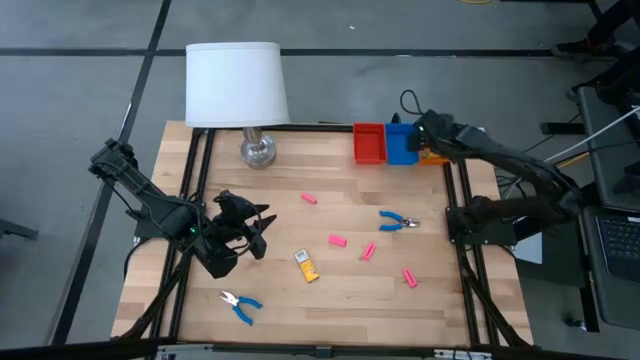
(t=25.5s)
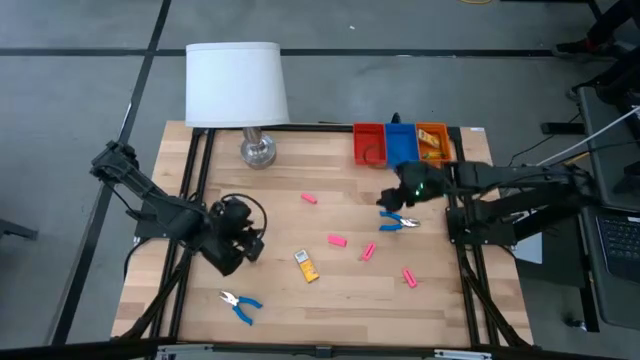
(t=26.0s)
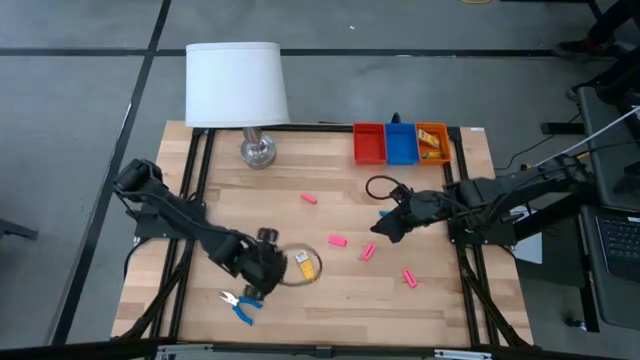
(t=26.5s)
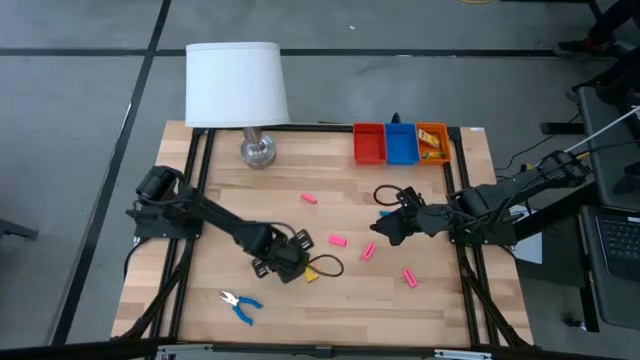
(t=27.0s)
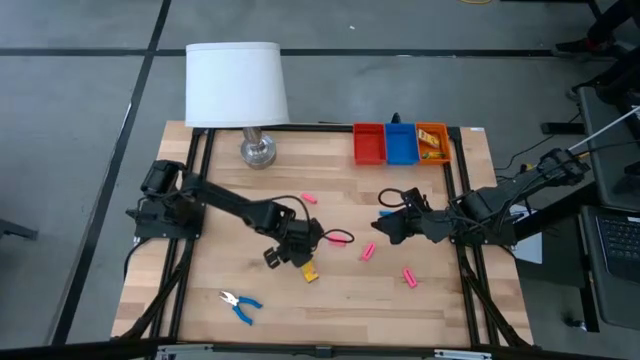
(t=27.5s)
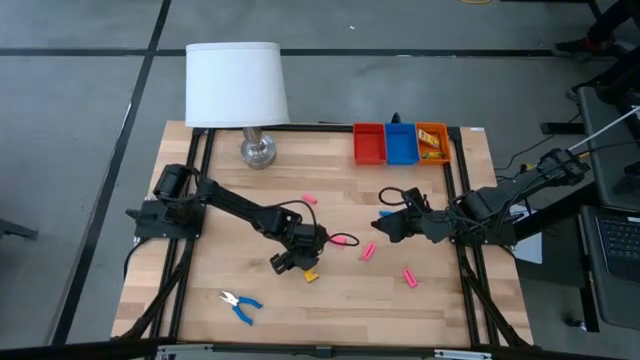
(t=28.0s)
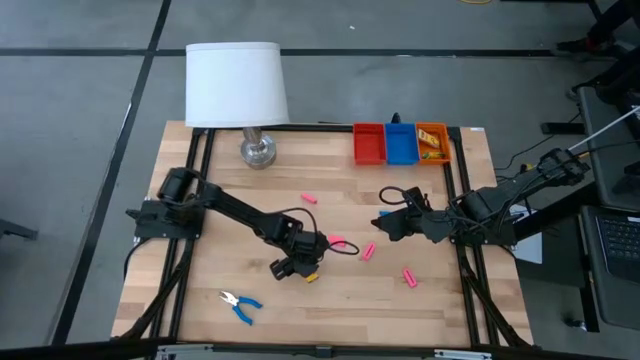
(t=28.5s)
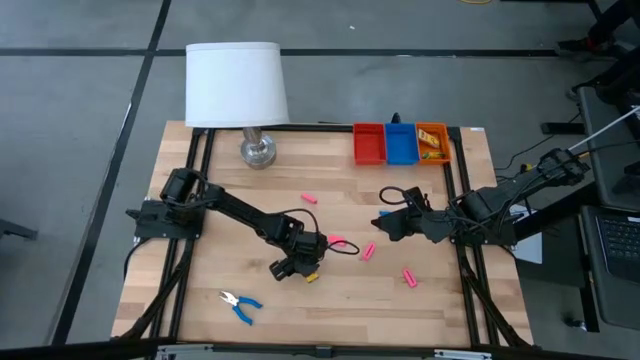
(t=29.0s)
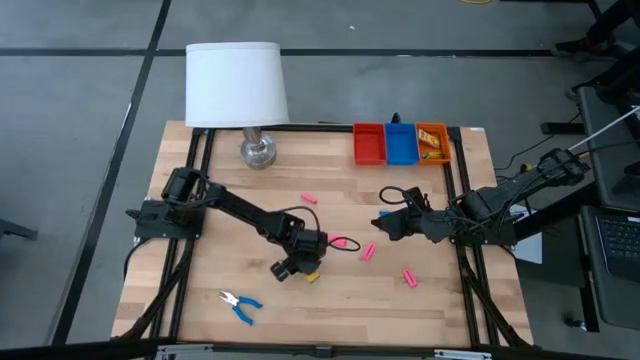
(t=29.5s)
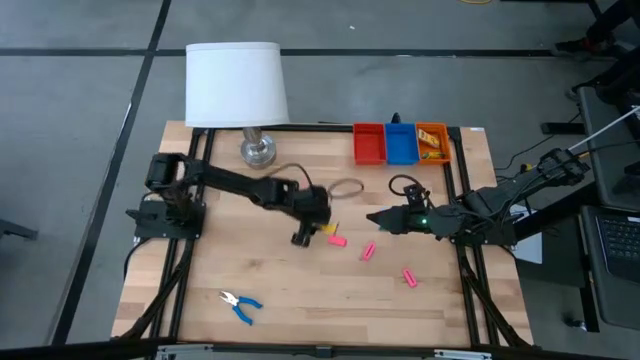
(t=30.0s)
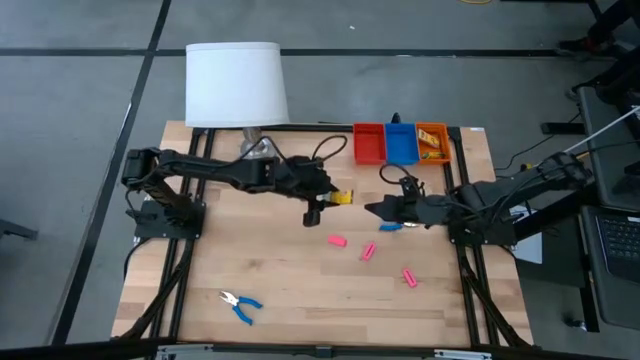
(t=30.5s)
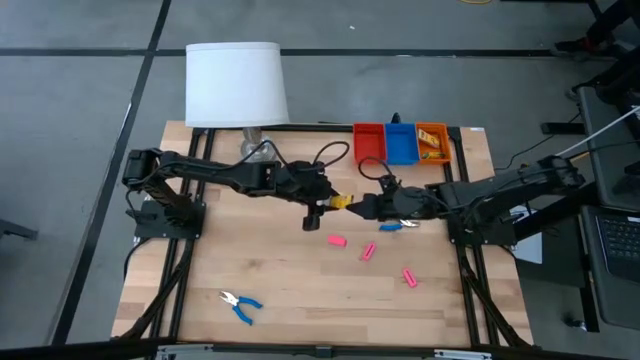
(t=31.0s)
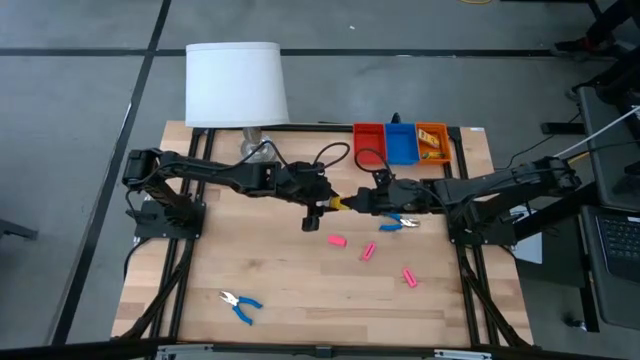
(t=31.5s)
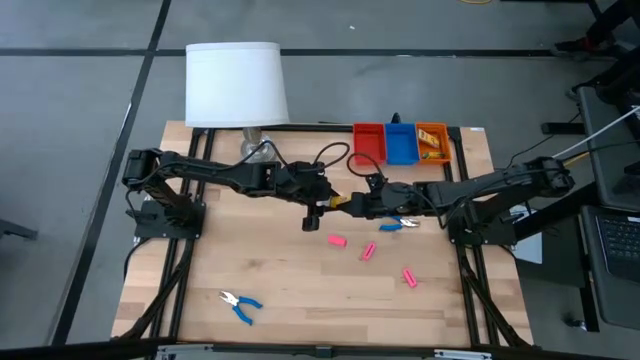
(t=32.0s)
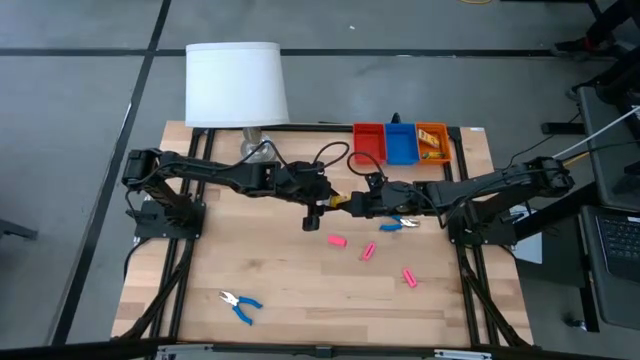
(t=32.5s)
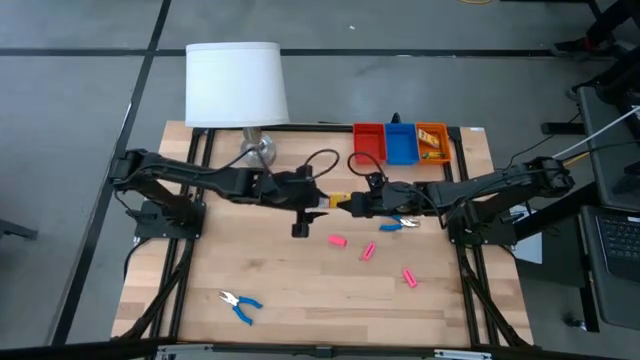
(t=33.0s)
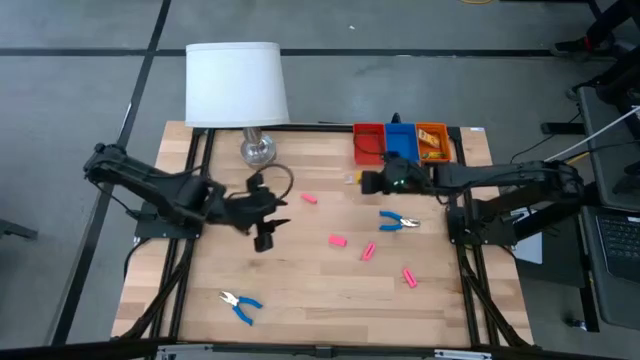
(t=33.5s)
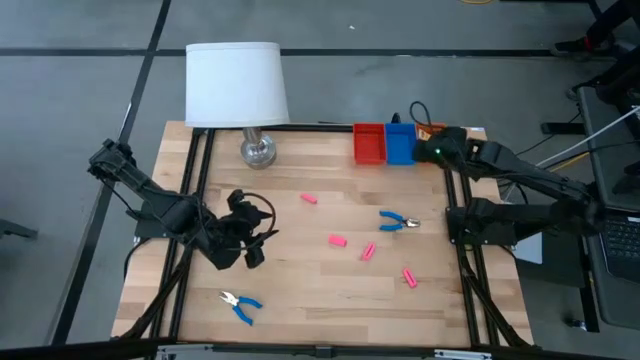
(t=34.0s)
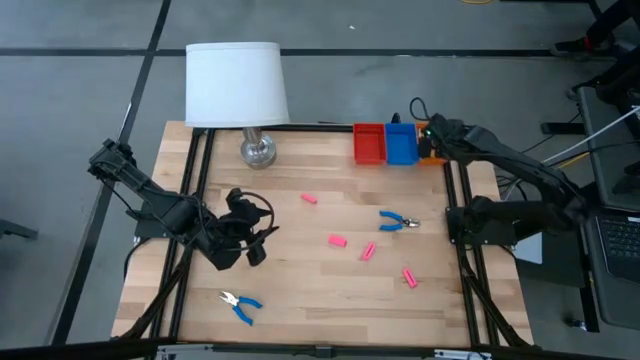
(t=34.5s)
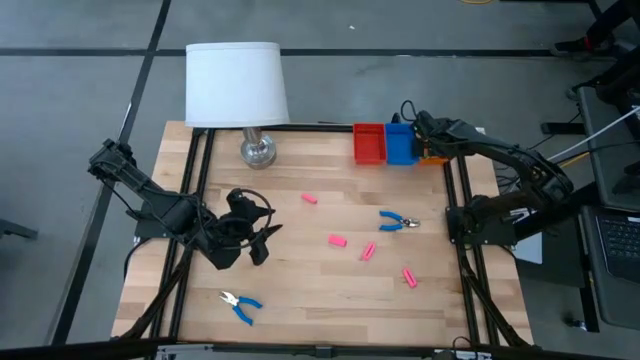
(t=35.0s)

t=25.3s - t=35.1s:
Task: Pick & Place School Supplies
Put the crayon box into the orange bin

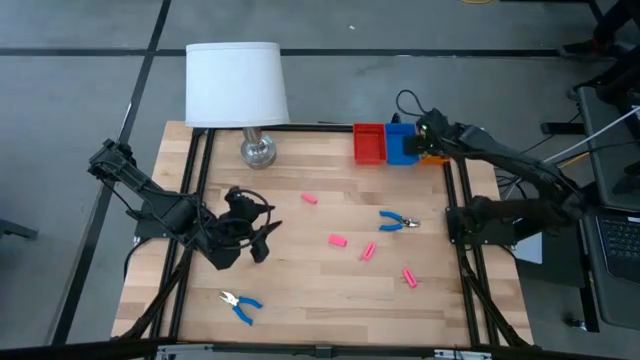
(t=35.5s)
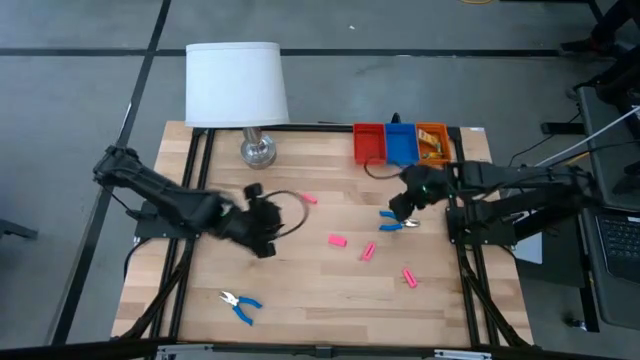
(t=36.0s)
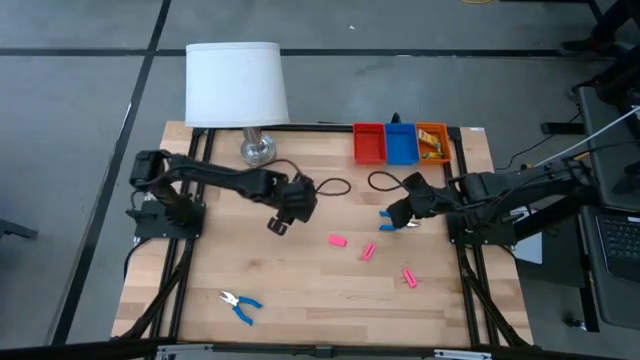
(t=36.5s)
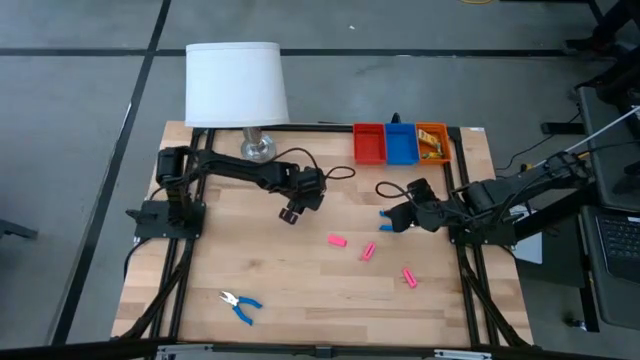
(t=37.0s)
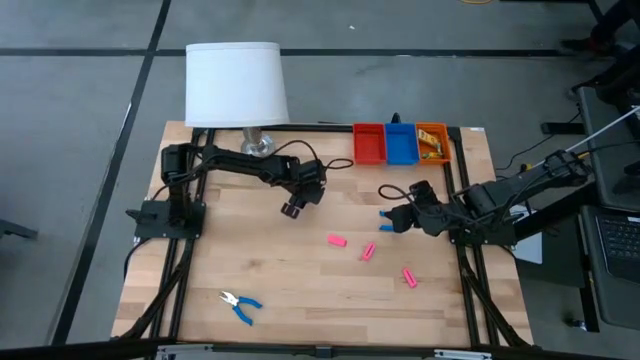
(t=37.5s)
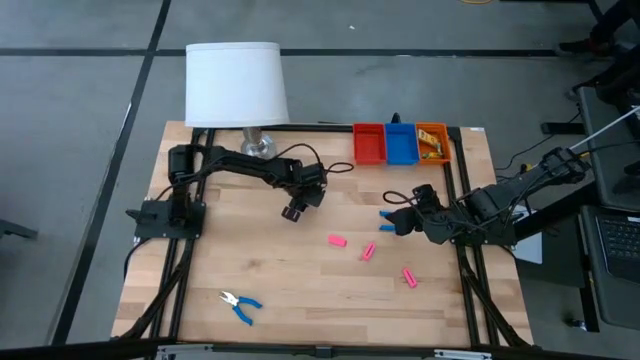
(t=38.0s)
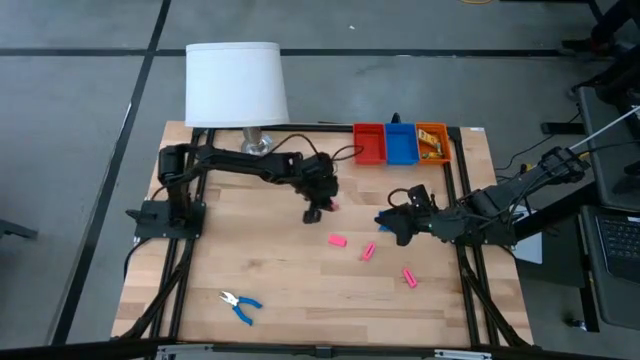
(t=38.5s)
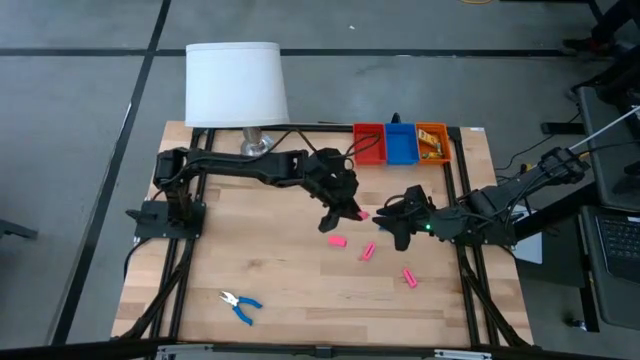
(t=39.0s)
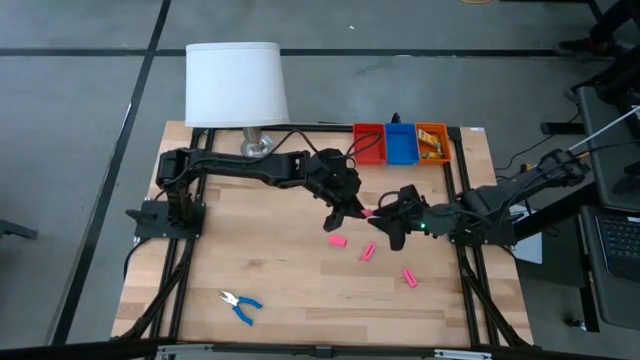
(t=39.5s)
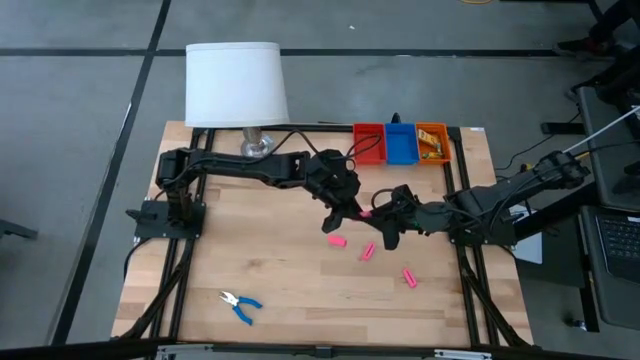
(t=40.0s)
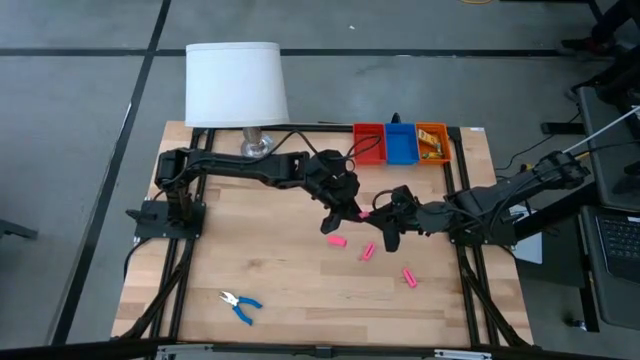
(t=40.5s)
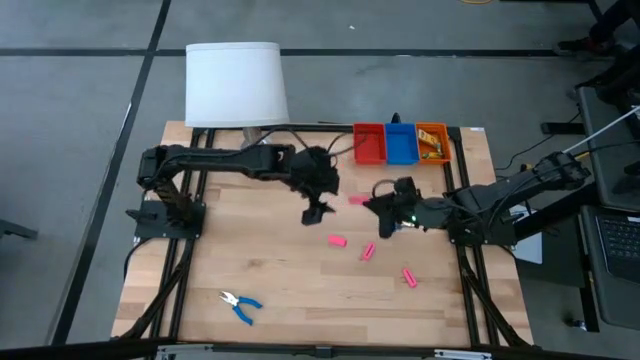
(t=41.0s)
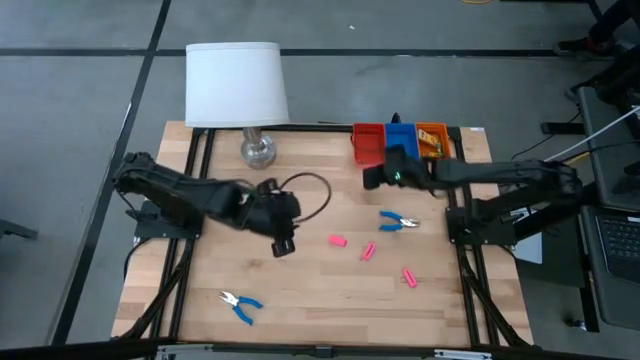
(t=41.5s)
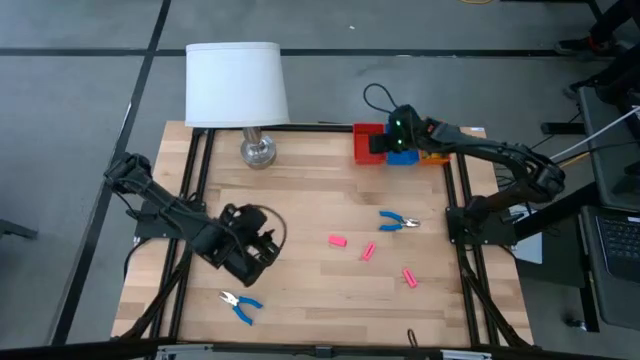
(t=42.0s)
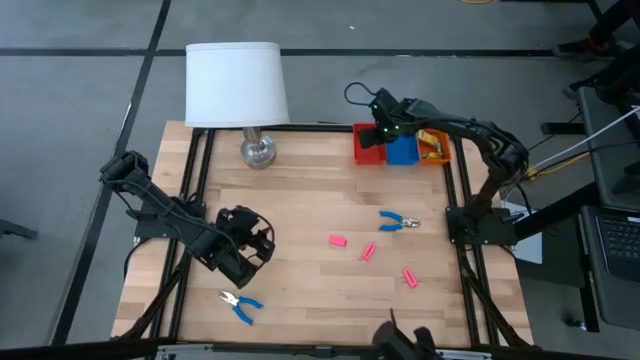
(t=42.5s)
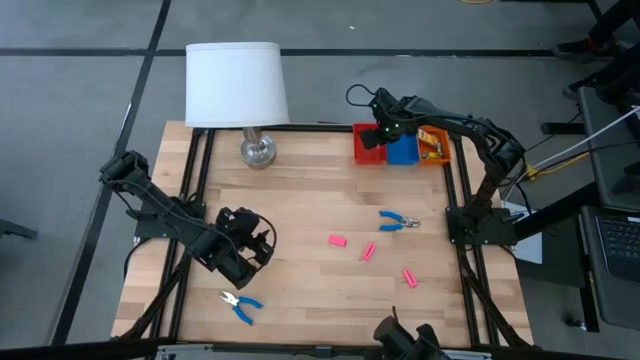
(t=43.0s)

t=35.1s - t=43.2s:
Put the pink eraser into the red bin

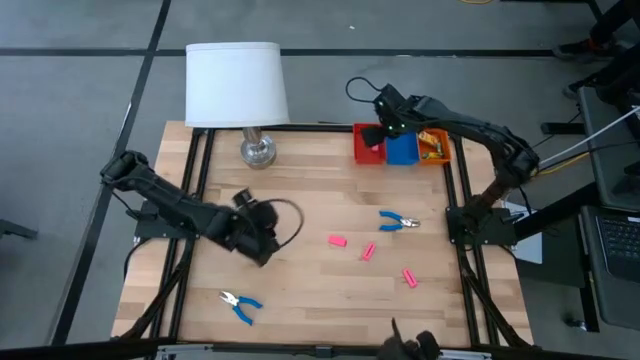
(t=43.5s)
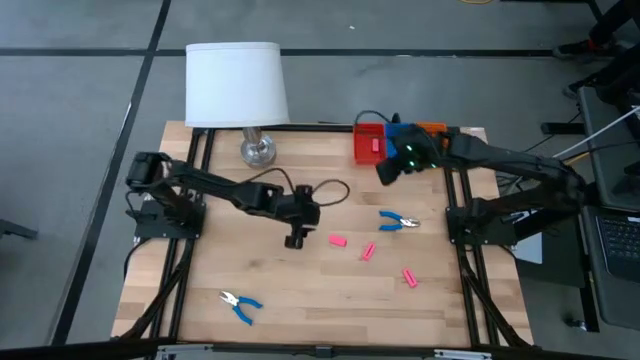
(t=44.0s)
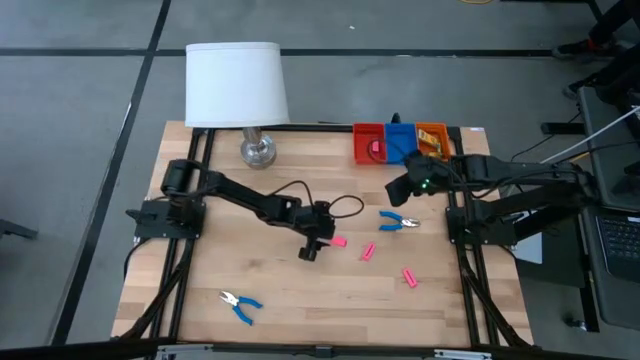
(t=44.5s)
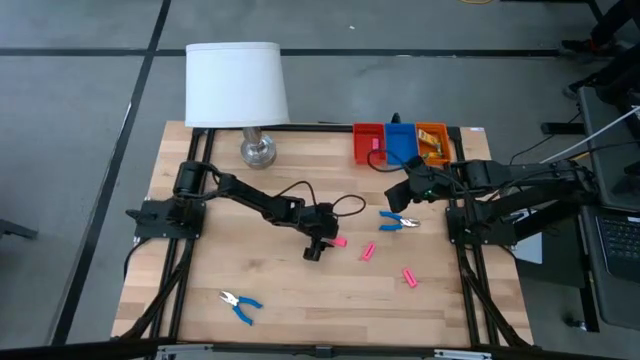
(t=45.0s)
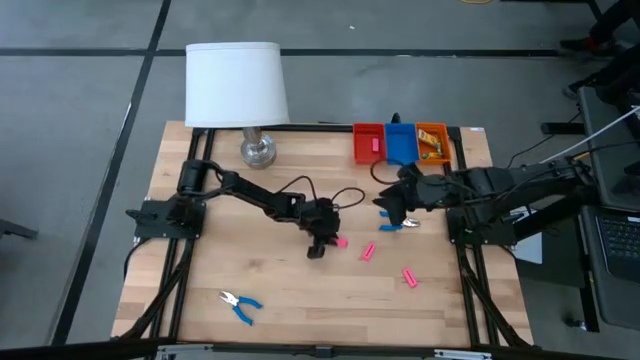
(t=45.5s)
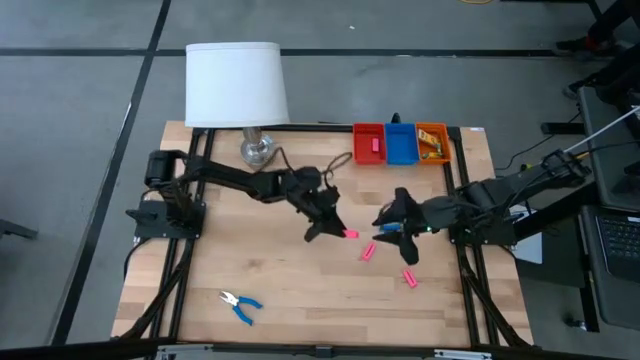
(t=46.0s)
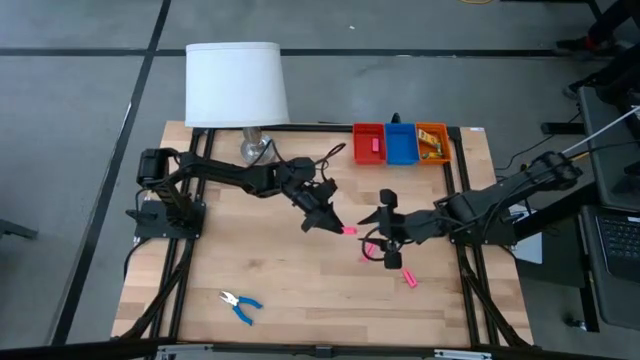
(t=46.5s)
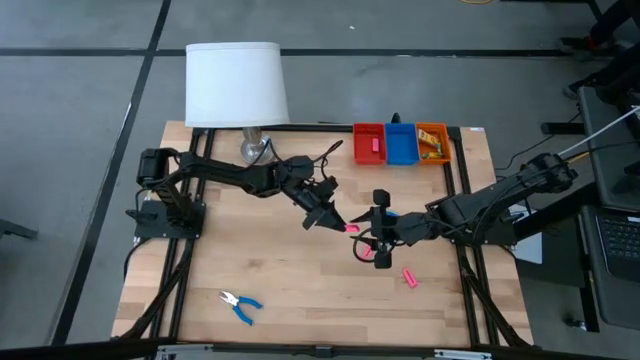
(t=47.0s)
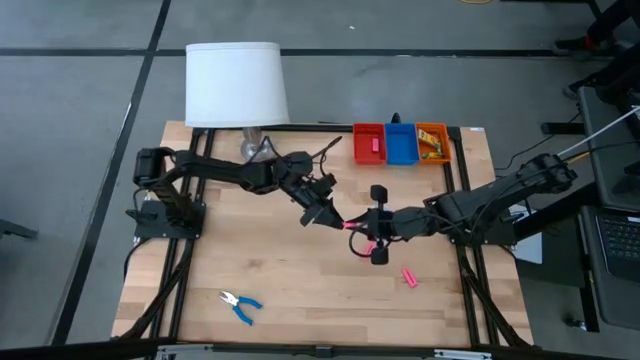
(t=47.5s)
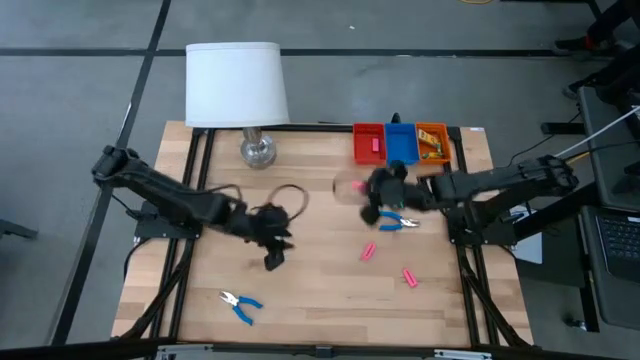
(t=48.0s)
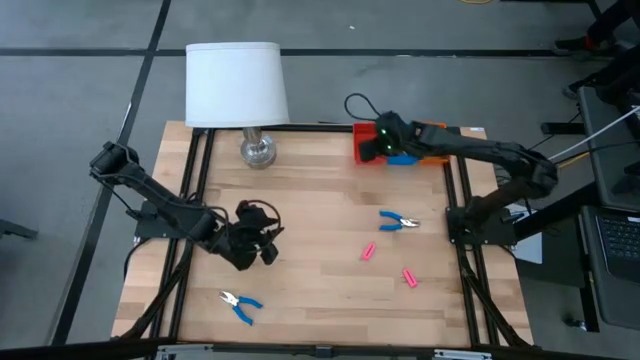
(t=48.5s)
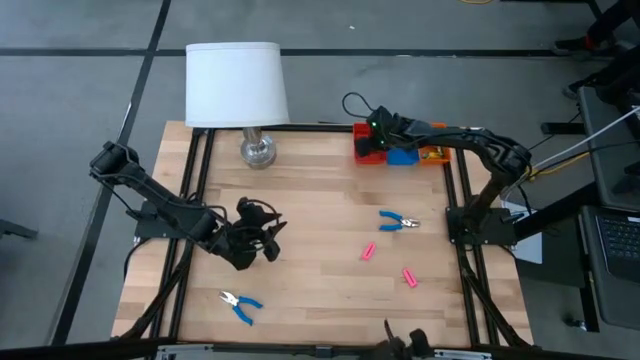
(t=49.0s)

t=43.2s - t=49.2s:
Put the pink eraser into the red bin
